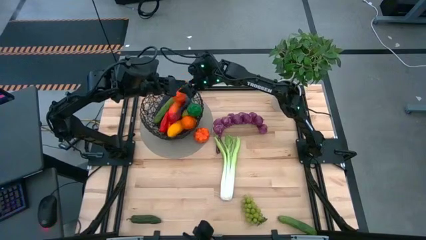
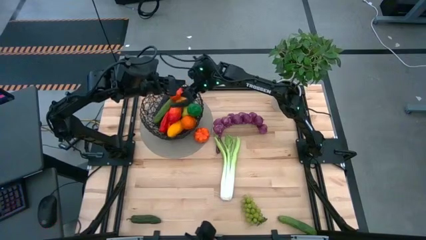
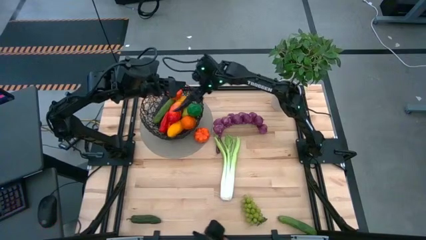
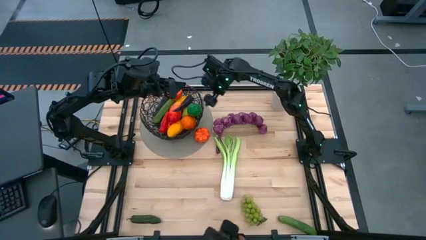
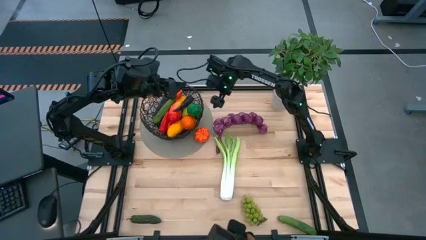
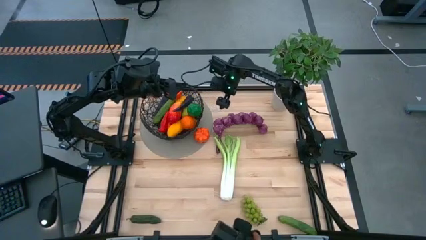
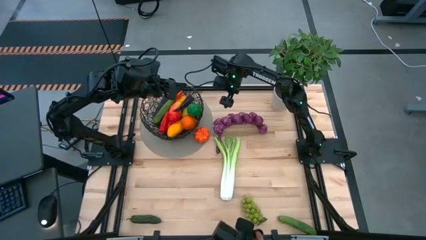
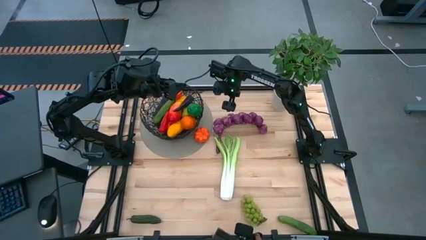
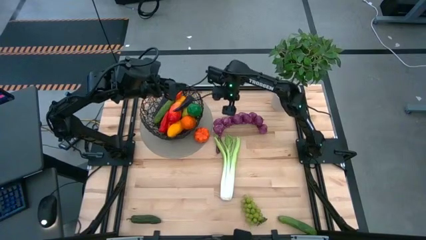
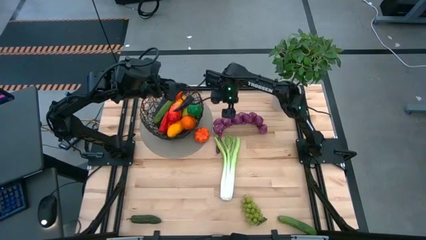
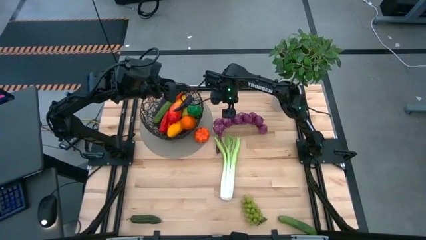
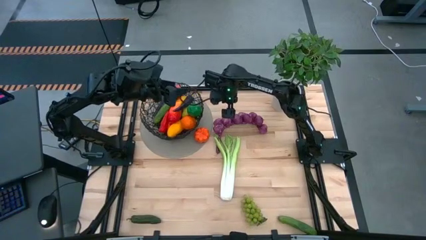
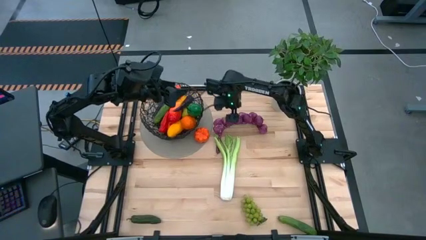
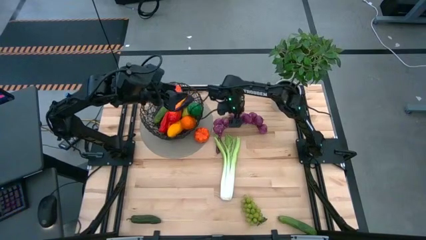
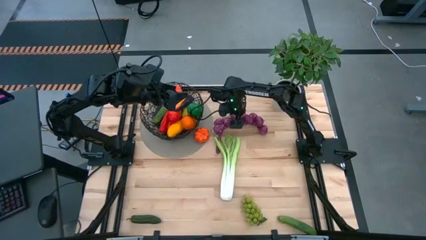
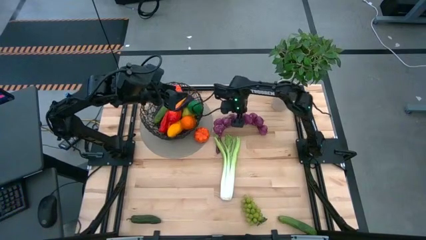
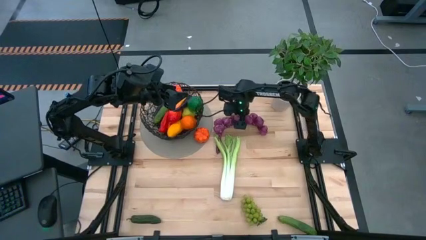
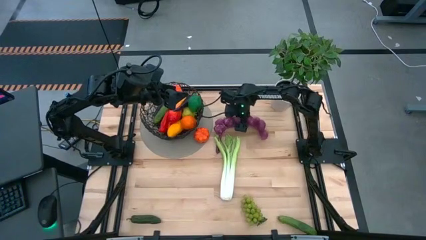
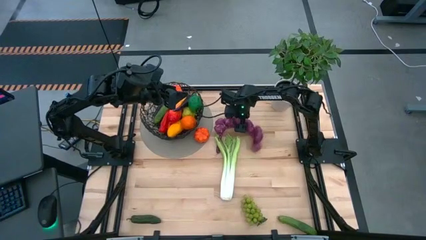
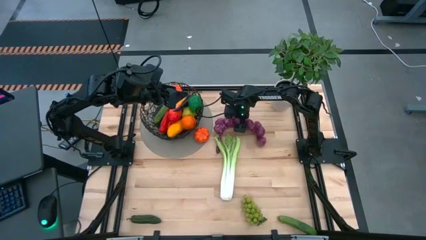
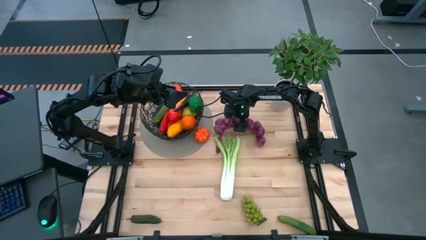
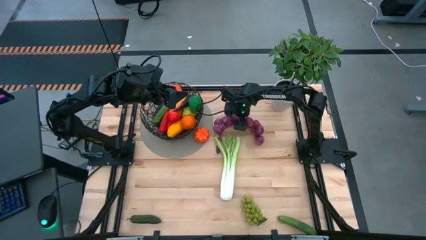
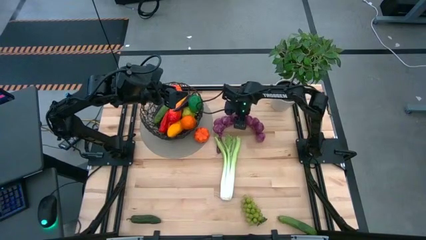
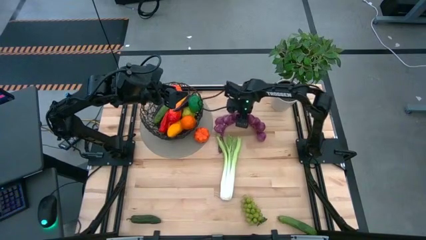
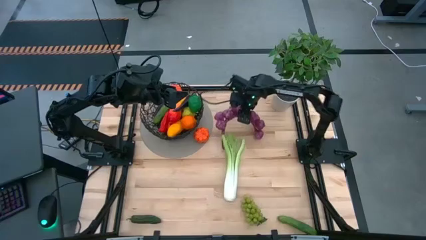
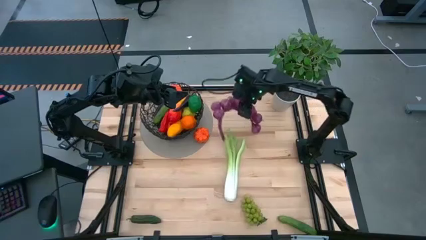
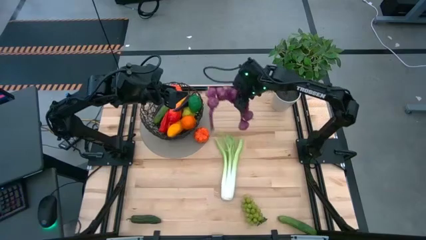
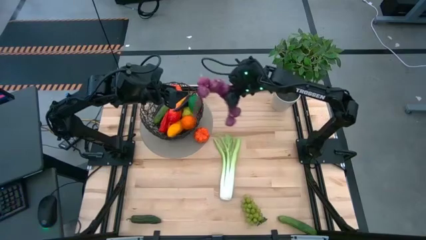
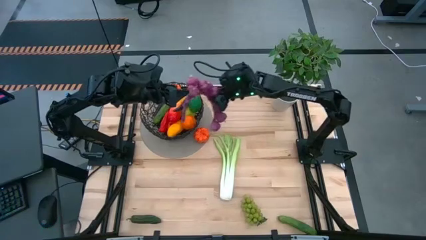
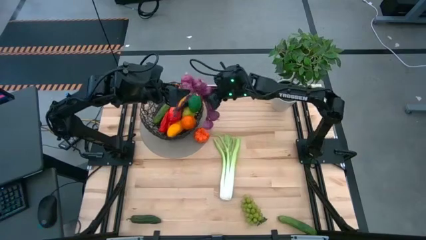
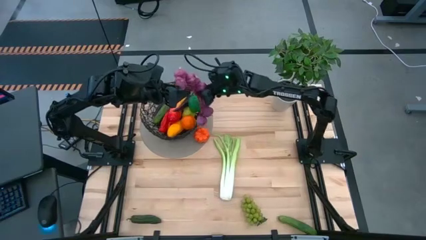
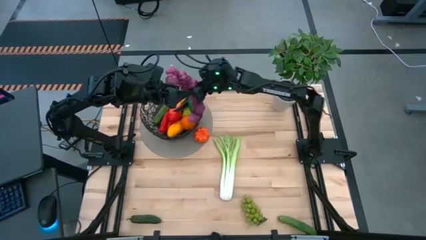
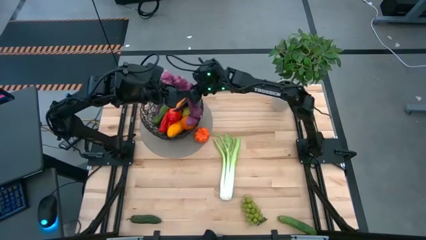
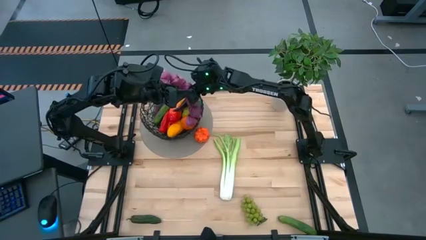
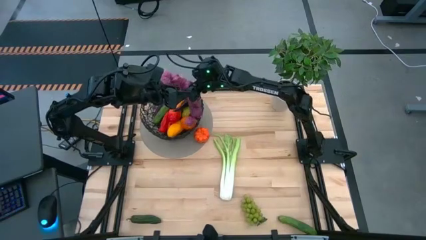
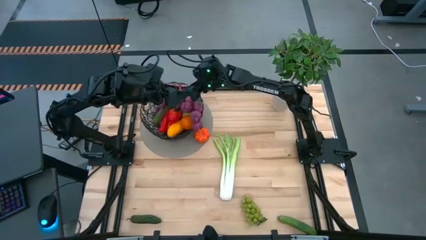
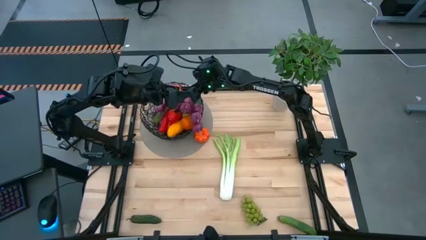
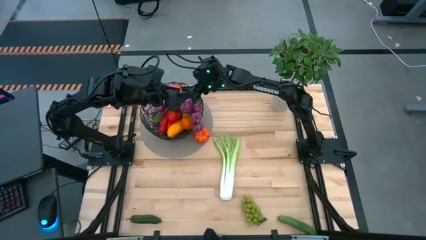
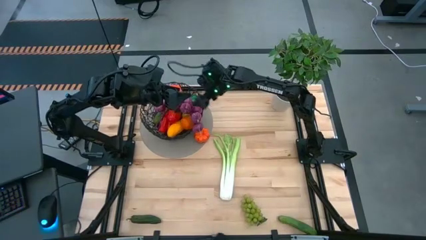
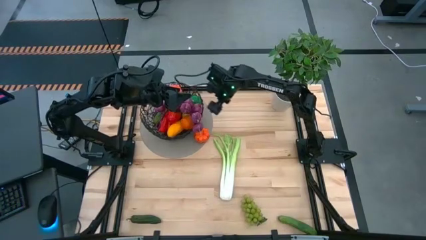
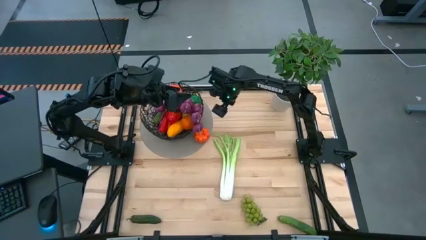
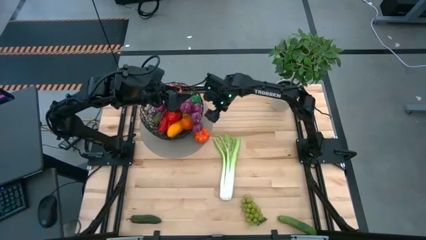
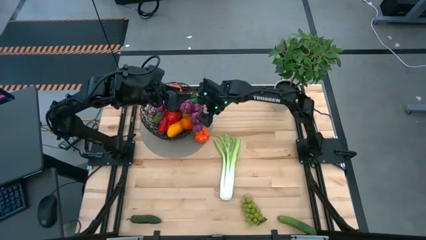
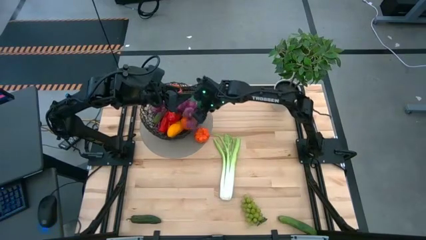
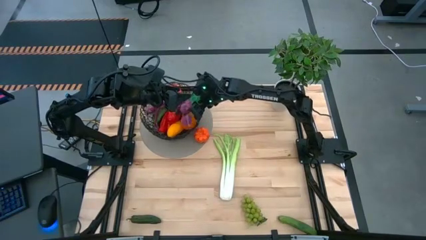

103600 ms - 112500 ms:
Task: Build produce basket
Put the purple garlic into the wire basket

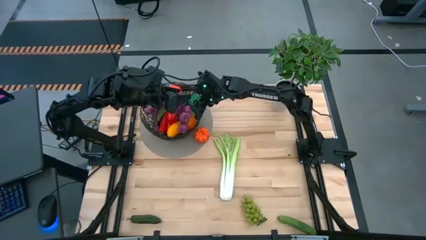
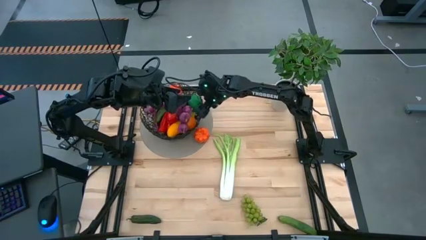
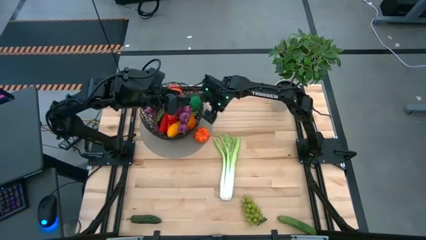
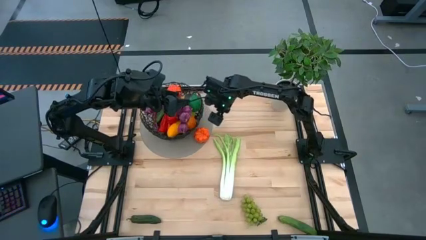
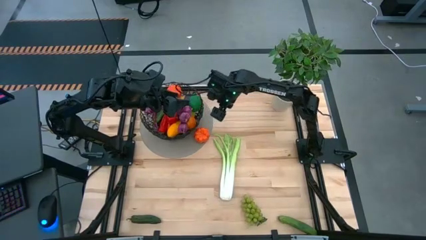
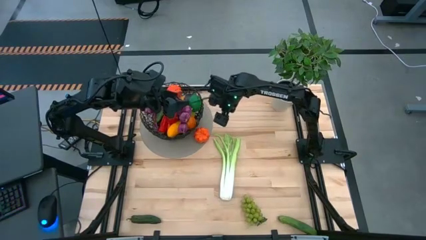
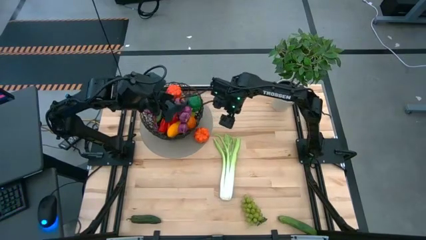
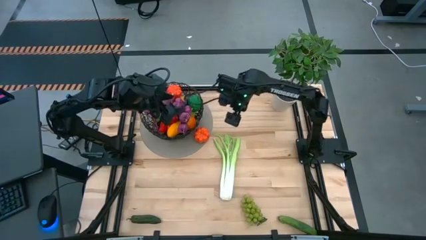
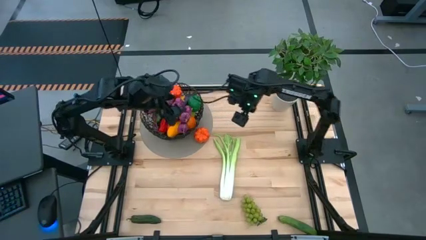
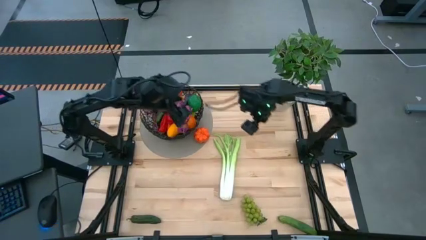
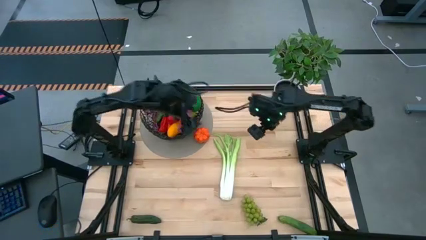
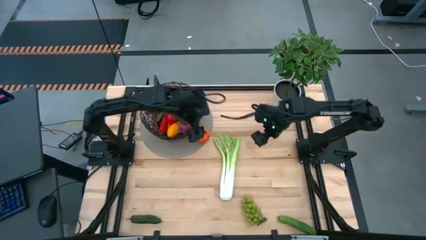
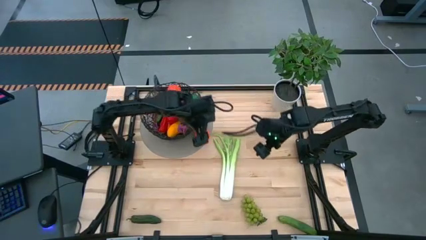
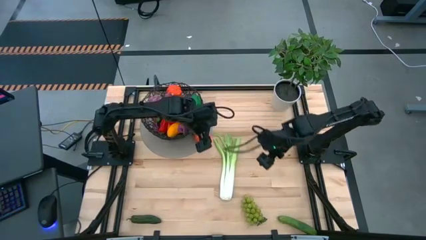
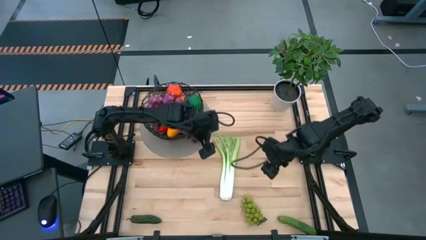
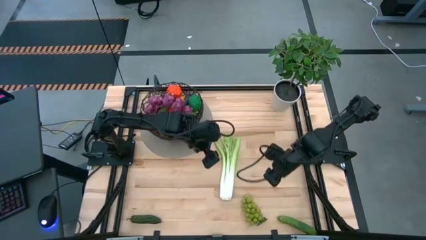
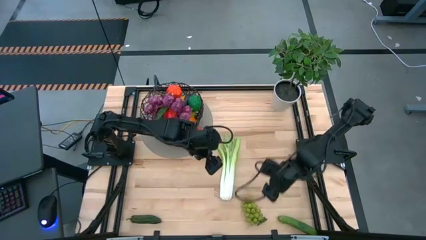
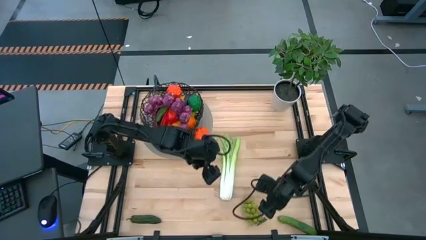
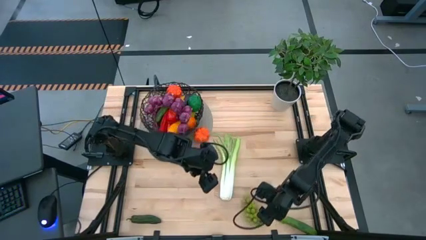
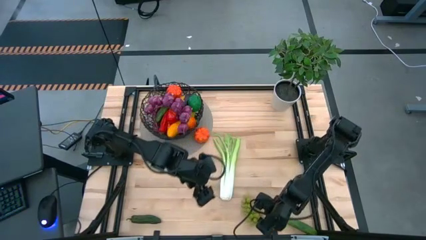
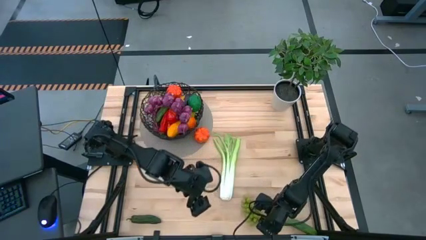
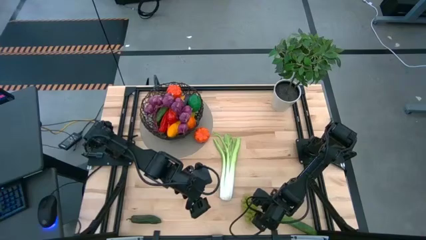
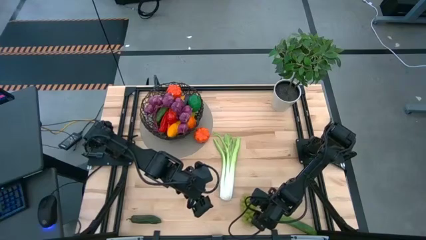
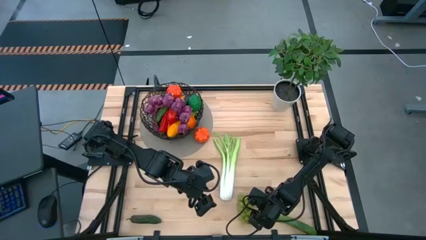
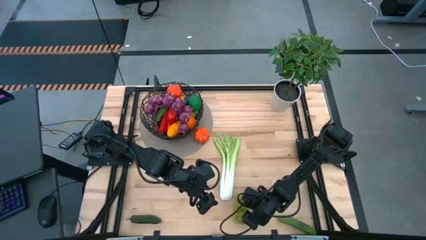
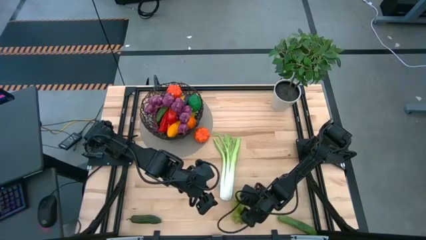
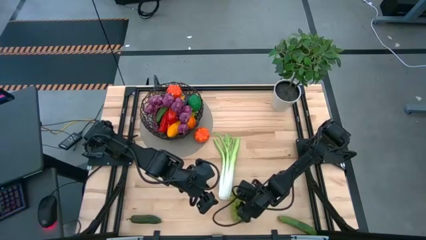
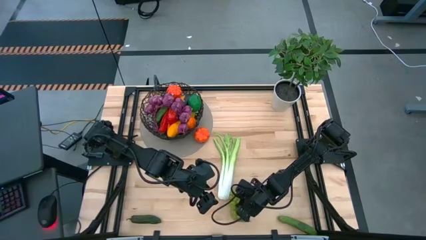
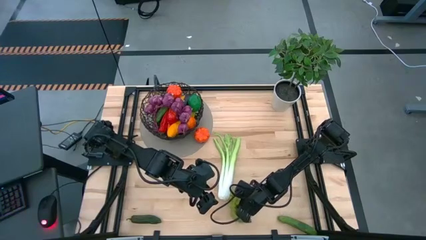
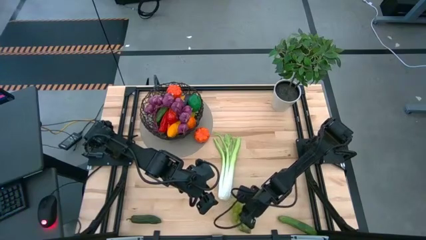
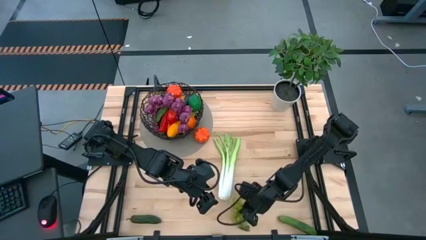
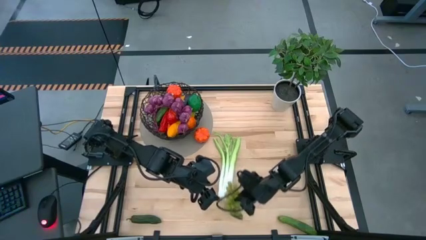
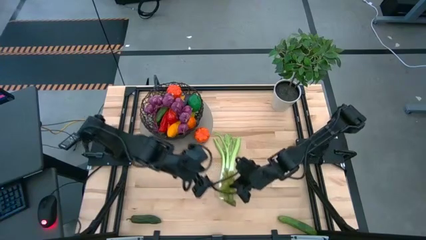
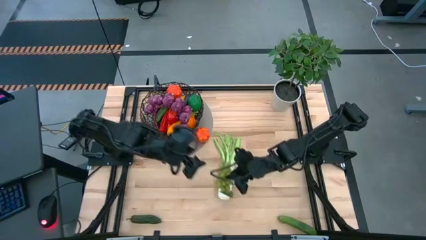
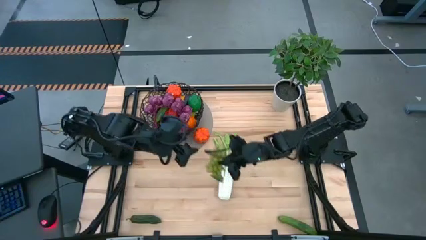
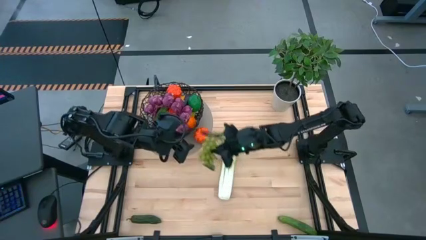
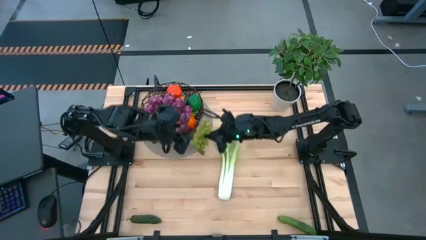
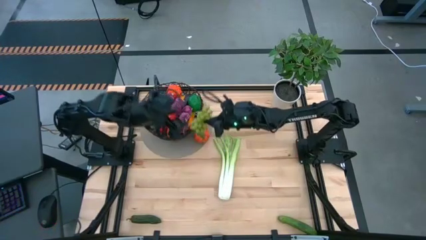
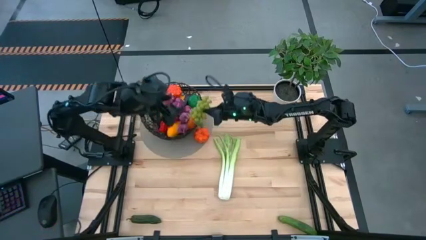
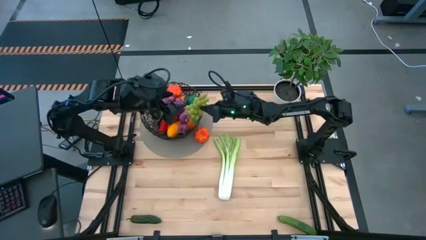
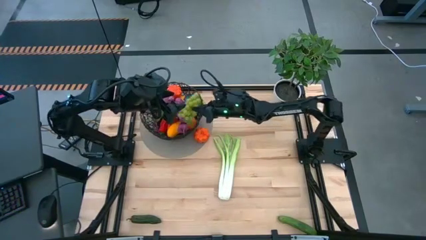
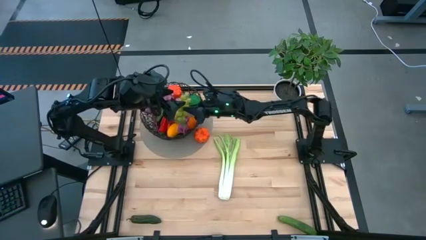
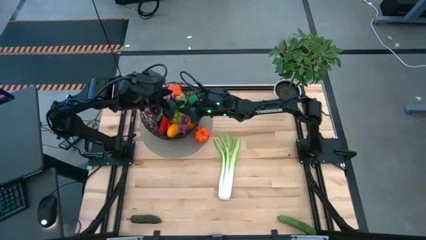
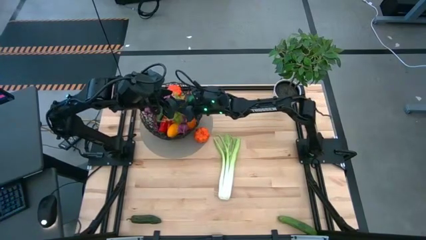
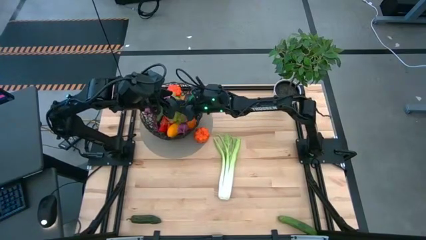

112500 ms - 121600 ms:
Put the green grapes into the wire basket
